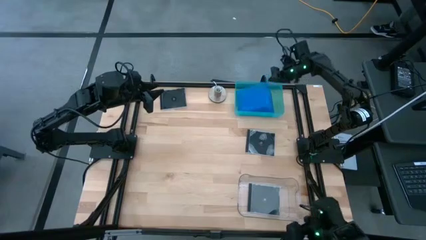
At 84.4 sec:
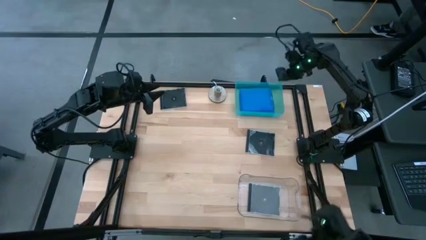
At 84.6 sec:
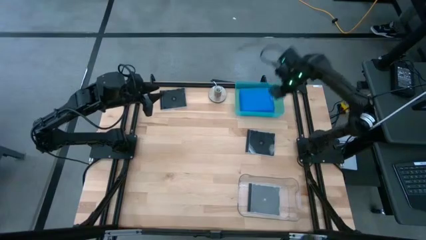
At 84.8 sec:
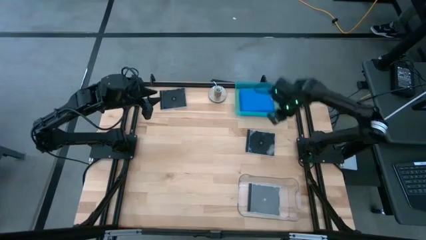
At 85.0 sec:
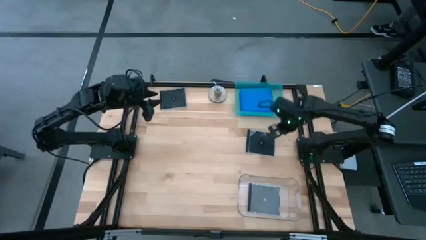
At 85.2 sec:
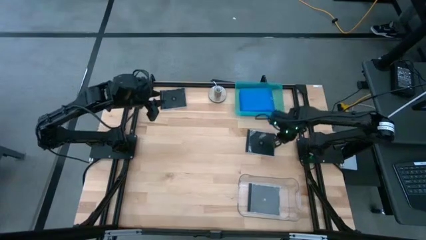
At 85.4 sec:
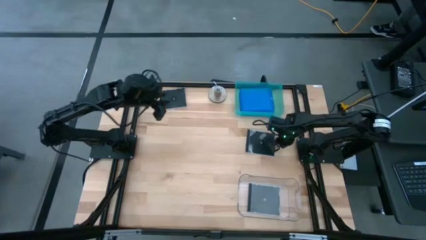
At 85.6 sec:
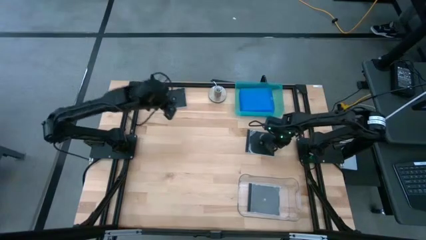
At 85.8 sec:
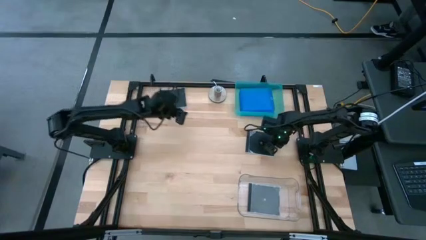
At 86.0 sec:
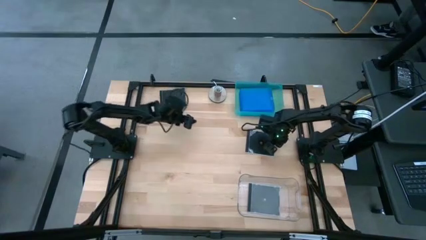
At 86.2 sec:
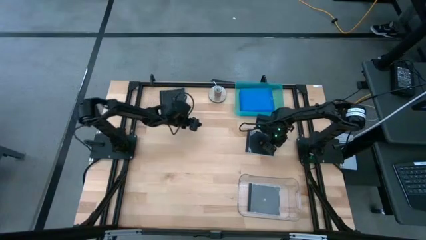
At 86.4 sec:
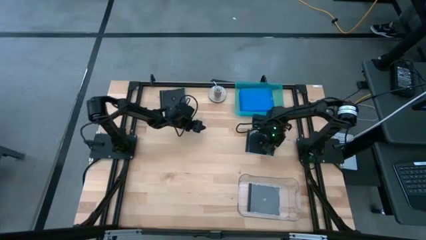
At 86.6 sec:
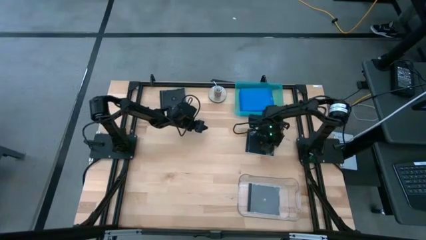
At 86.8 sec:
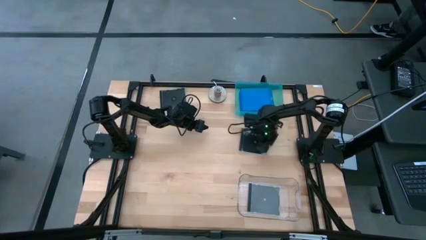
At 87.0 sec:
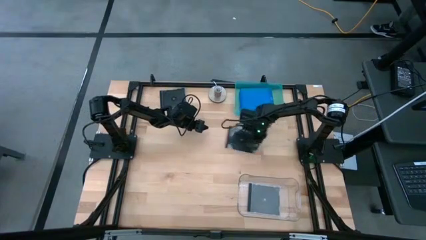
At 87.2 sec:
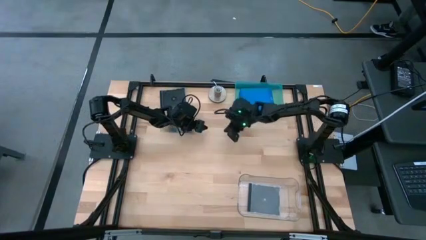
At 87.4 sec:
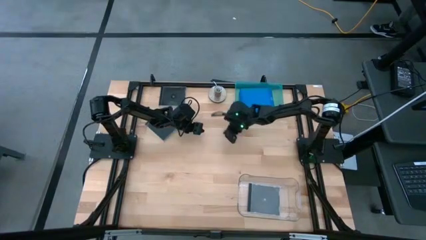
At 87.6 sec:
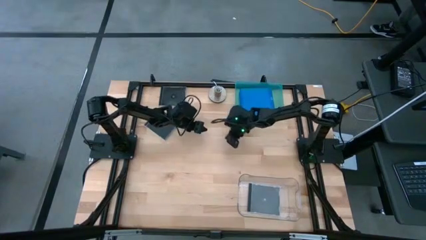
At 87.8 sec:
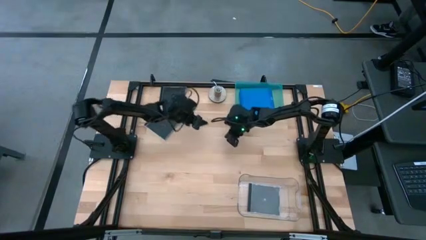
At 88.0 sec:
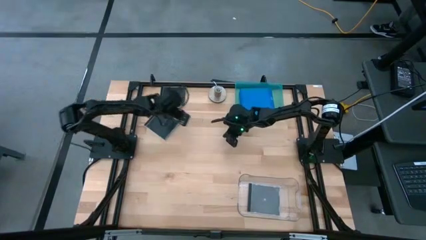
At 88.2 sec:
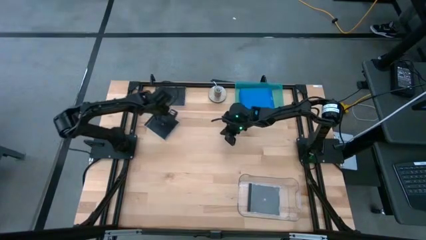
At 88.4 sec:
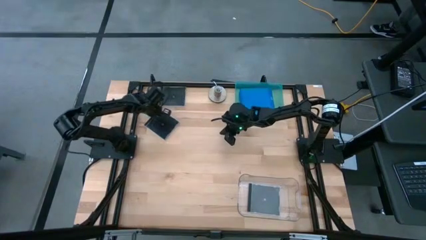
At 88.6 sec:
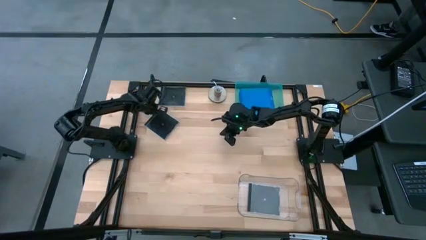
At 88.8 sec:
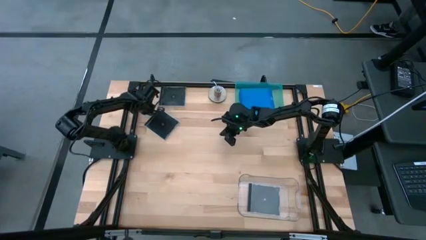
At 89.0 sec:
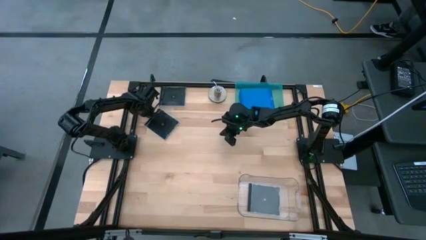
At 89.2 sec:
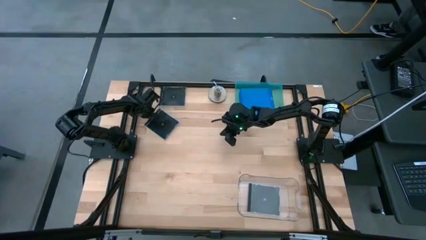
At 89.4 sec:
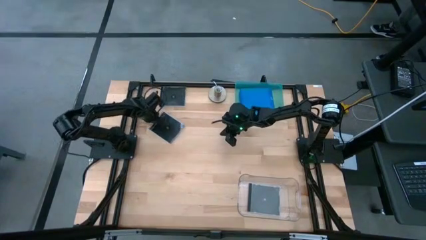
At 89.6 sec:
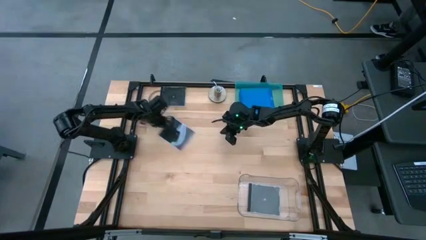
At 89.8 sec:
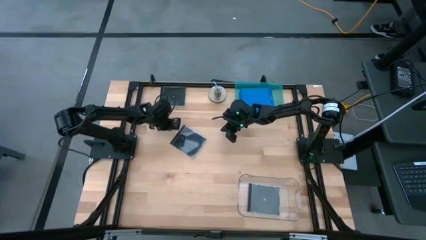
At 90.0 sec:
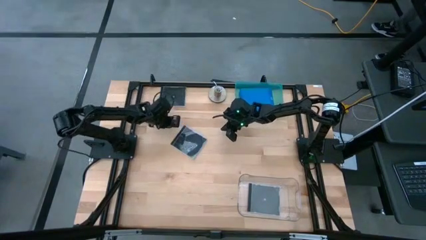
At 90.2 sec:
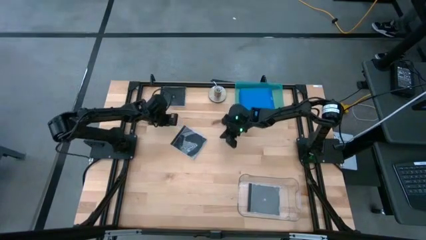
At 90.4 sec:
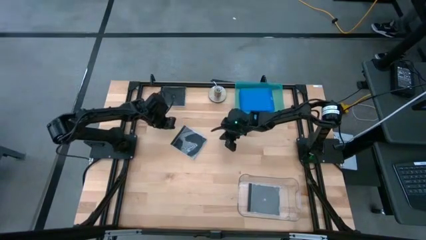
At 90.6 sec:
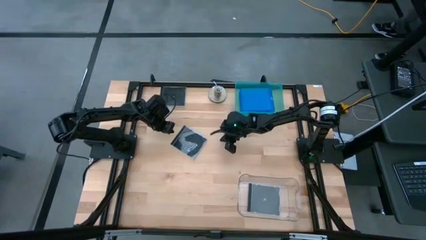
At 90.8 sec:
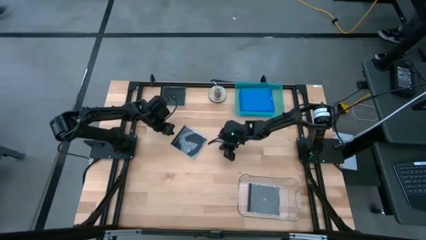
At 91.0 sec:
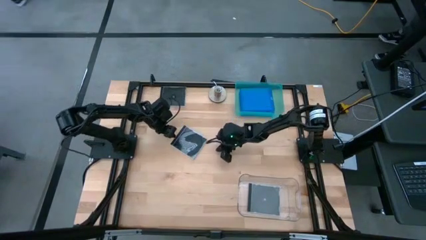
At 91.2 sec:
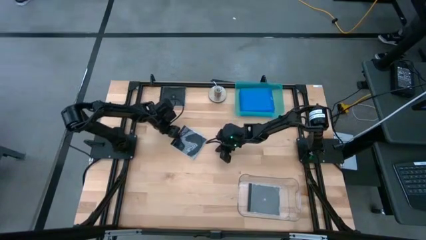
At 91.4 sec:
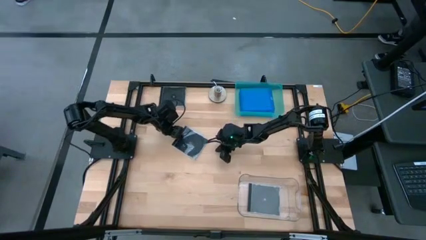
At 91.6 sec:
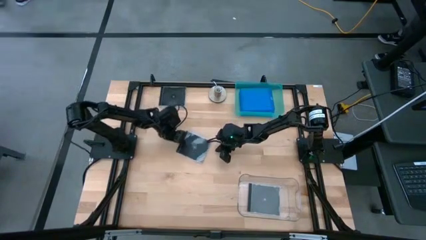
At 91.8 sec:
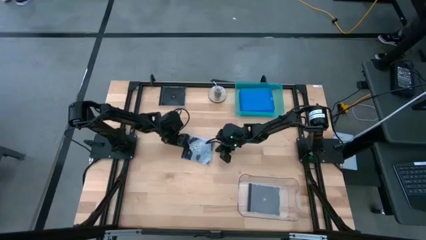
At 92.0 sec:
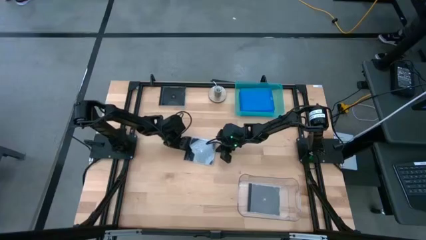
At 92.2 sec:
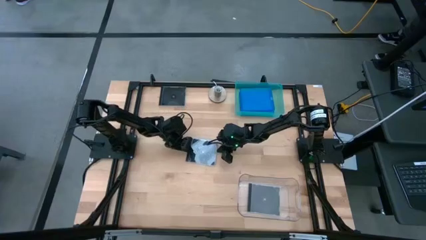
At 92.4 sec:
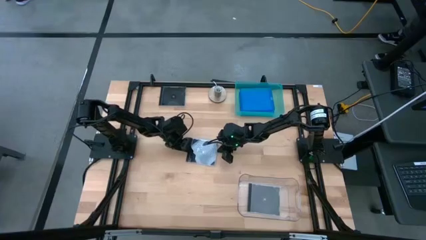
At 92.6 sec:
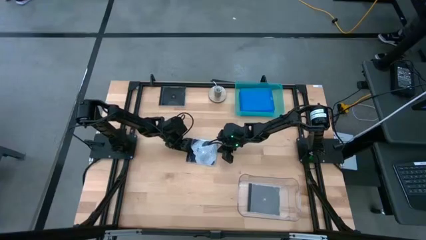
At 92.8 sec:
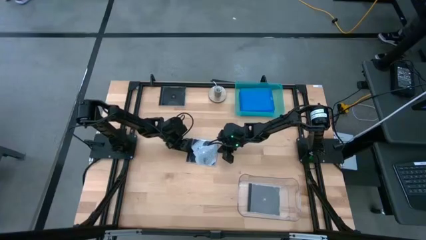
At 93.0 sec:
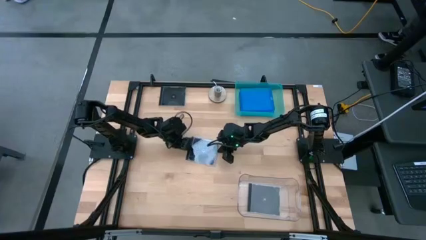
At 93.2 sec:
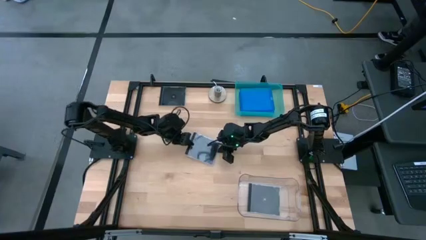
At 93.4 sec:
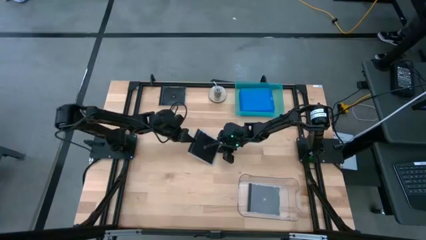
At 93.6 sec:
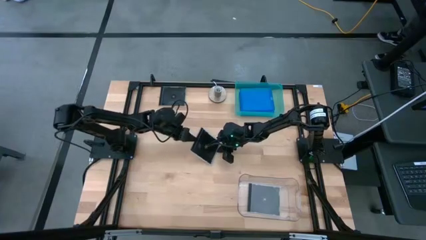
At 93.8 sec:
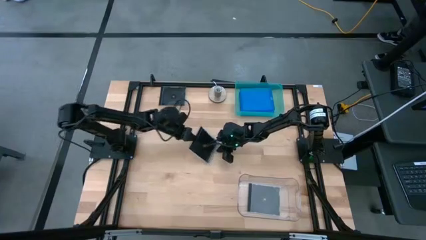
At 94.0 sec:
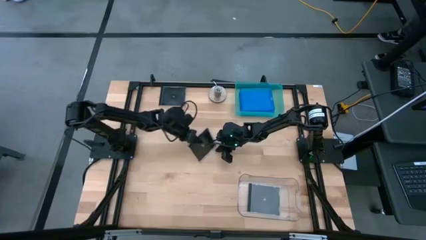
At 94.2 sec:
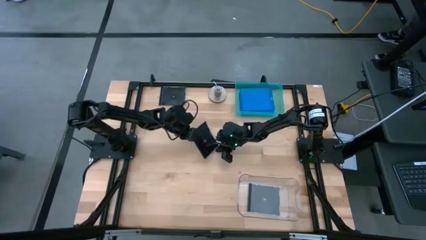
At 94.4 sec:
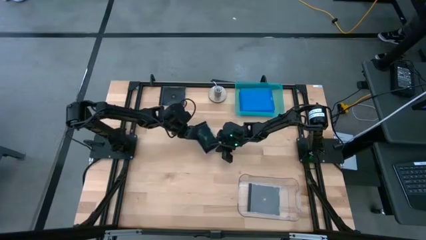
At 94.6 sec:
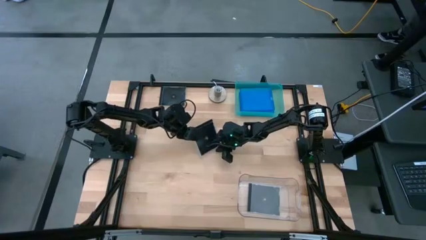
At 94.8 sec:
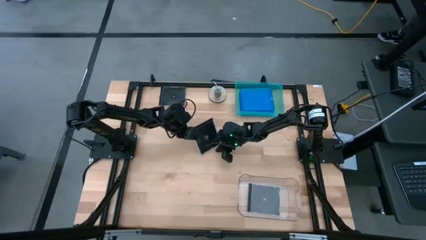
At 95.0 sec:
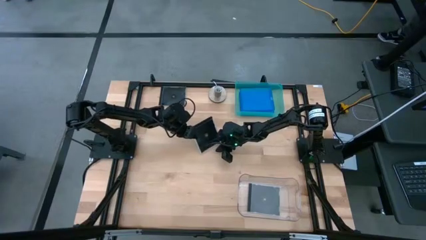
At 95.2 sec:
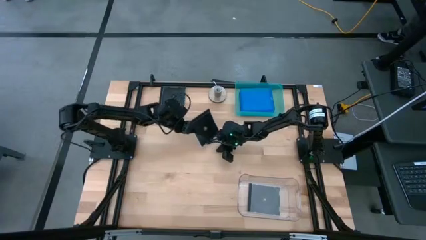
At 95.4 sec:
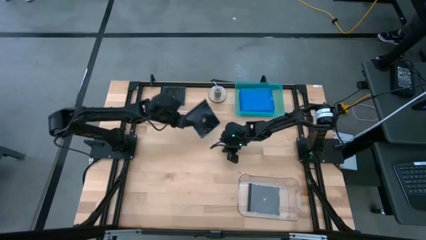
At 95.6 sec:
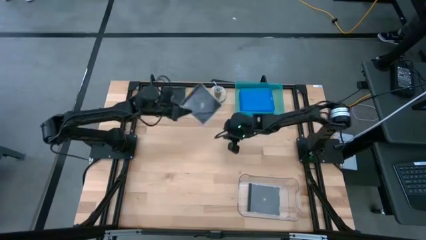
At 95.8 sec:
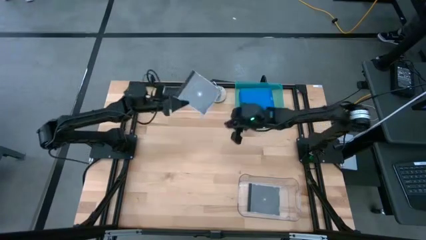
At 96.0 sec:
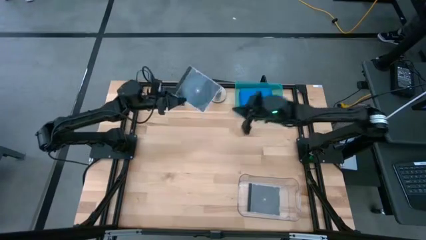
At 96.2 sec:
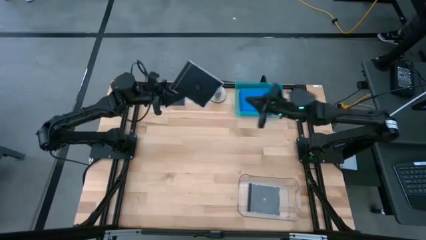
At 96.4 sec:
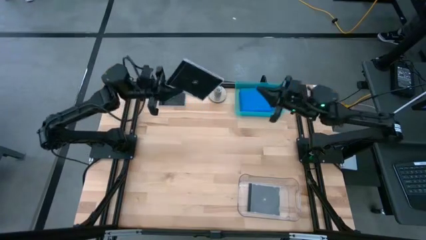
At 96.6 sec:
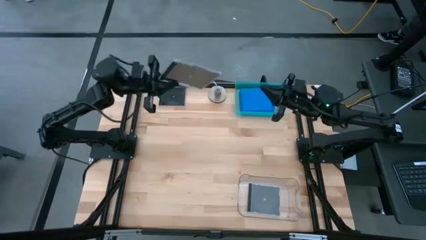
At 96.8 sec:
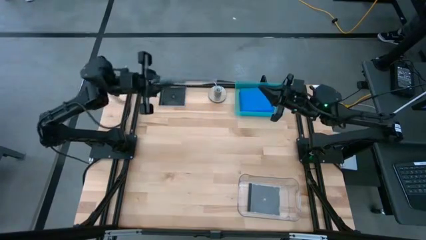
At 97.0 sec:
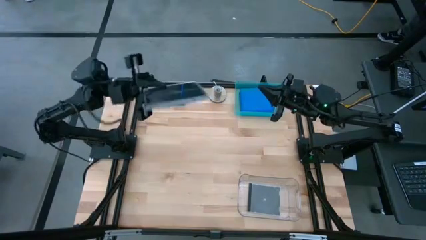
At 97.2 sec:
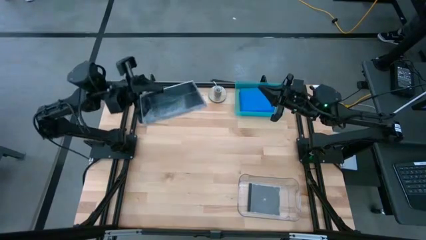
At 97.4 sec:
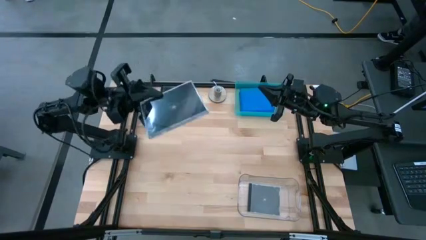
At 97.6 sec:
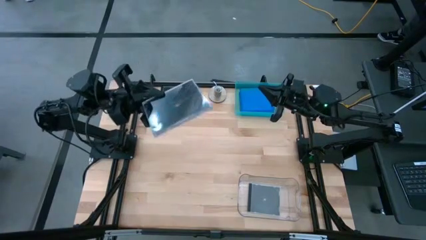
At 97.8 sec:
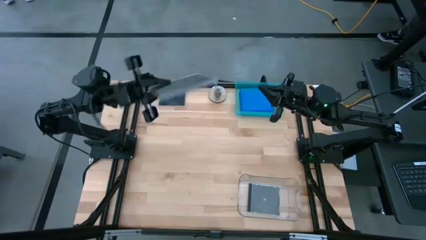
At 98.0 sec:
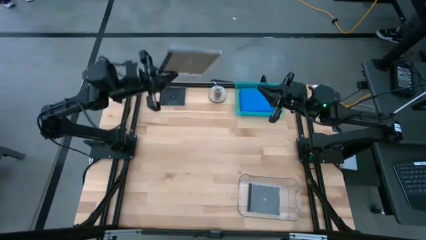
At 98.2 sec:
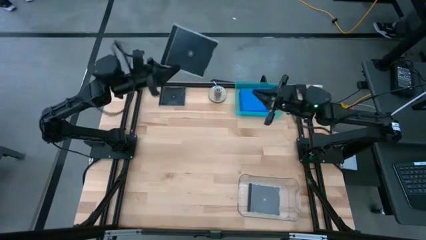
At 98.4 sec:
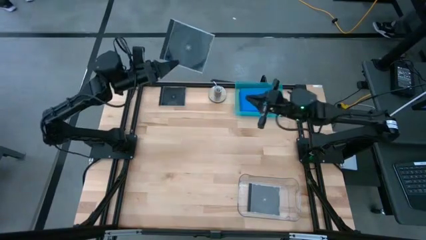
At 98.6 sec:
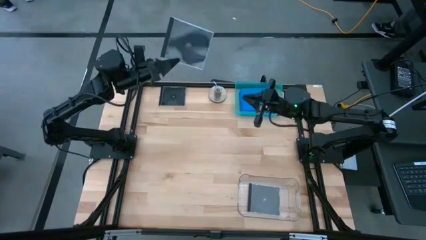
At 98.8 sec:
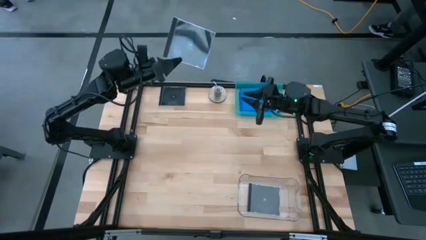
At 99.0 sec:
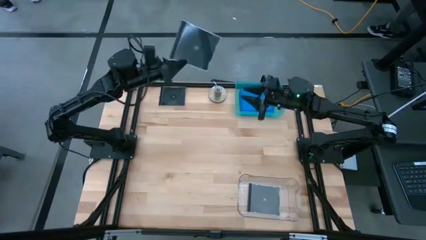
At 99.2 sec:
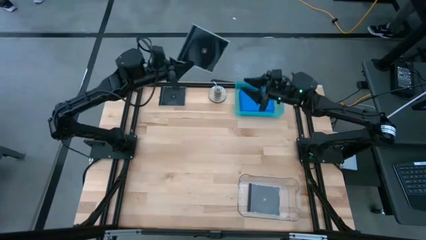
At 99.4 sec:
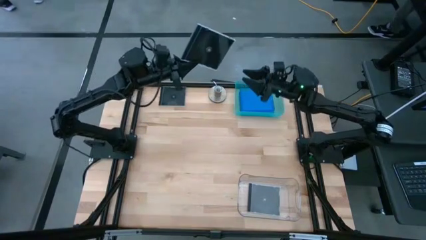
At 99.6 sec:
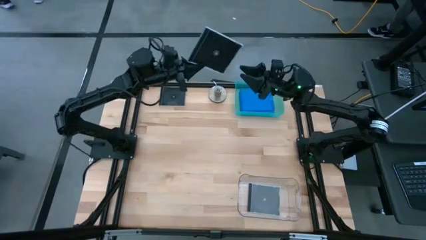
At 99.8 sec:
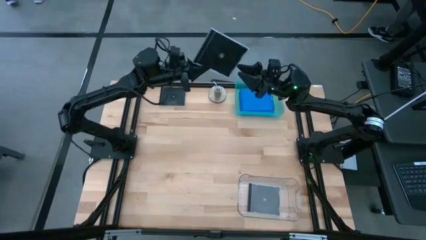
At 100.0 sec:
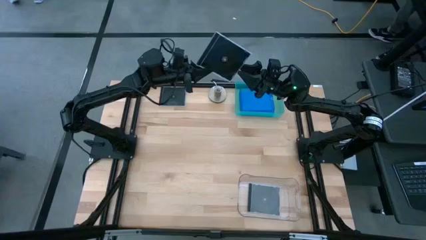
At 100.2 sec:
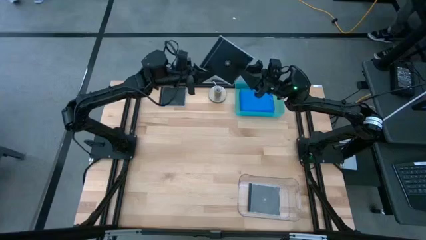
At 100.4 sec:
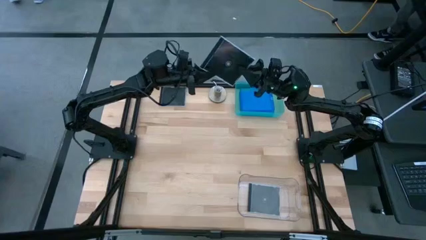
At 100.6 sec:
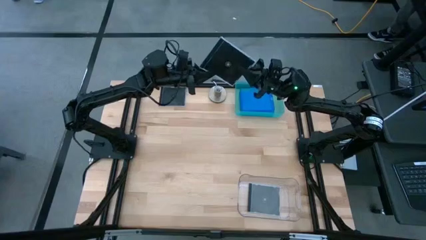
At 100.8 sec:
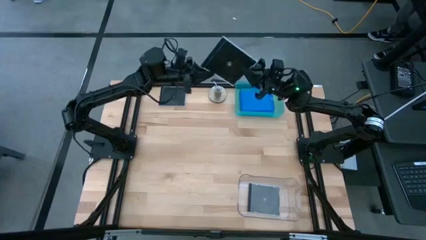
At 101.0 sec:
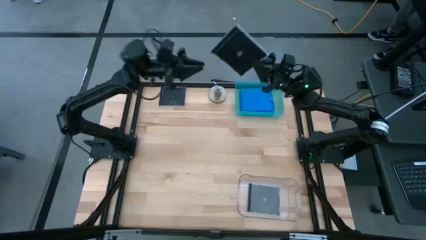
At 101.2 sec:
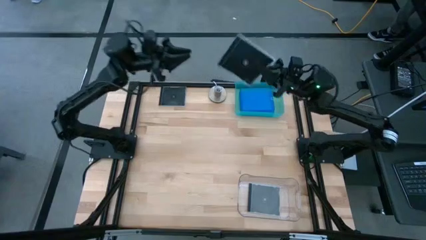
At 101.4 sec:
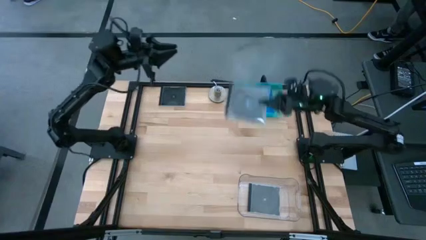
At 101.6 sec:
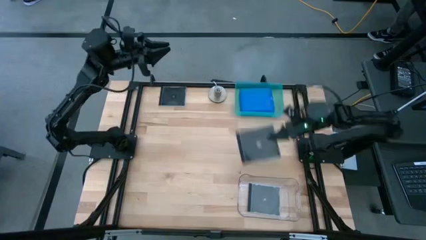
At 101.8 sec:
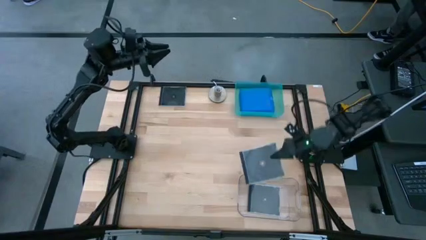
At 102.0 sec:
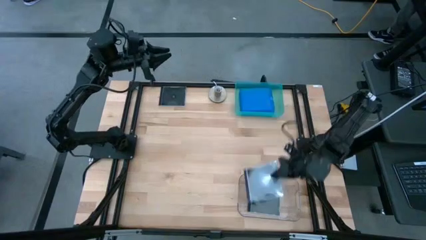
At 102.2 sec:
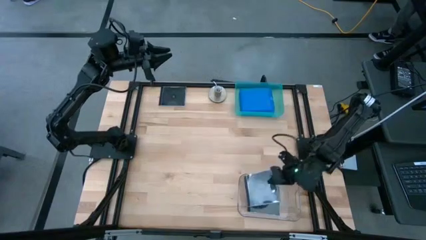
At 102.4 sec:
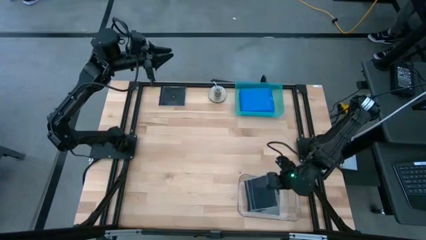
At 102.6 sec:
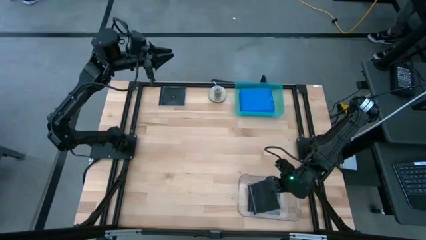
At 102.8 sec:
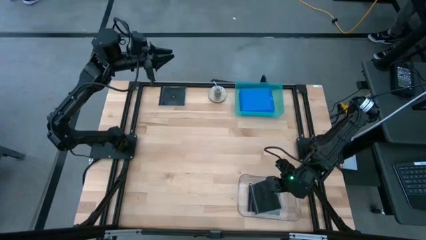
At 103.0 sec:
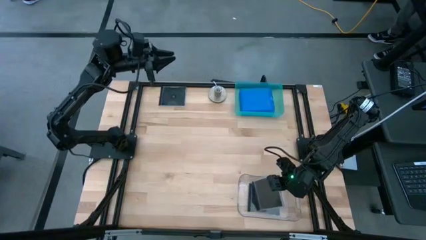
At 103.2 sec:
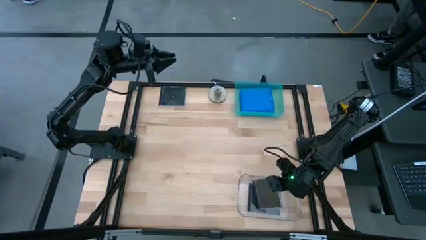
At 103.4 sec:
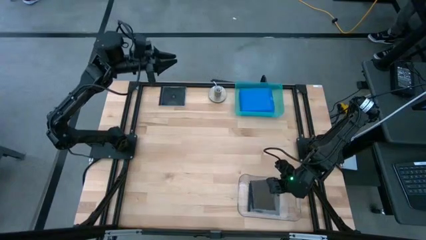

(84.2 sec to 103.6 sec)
Task: Pick & place jewel cases by type
Put the right black CD case into the transparent bin
